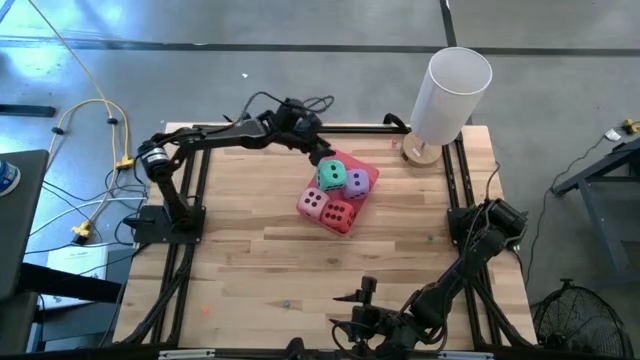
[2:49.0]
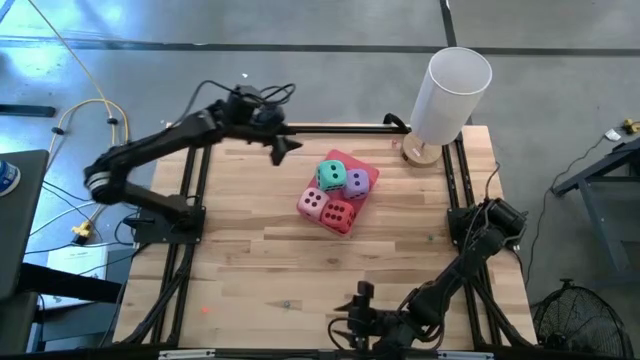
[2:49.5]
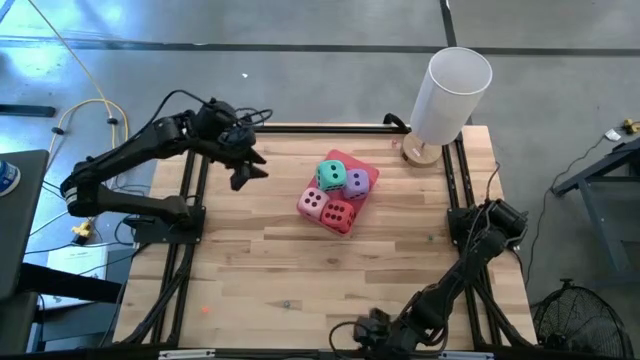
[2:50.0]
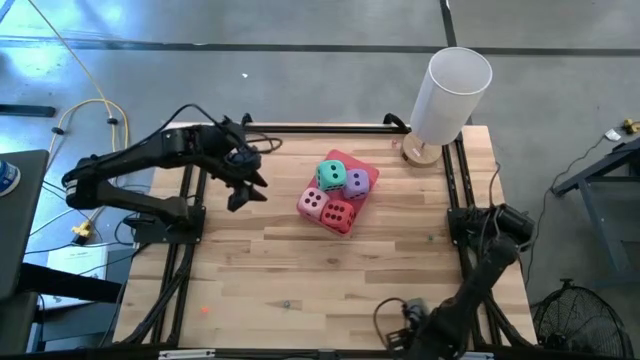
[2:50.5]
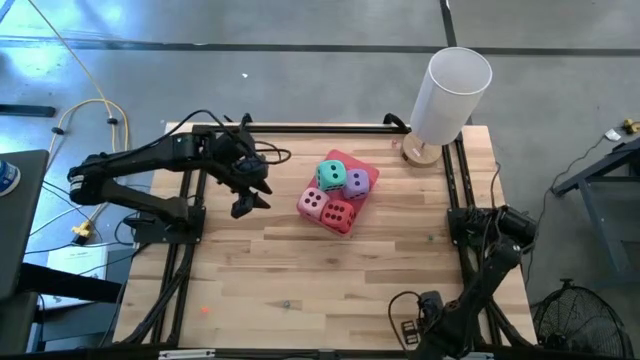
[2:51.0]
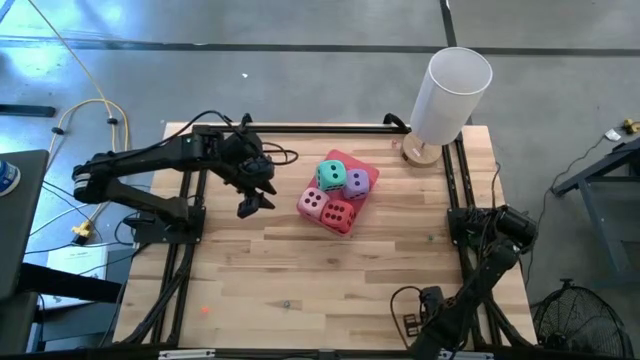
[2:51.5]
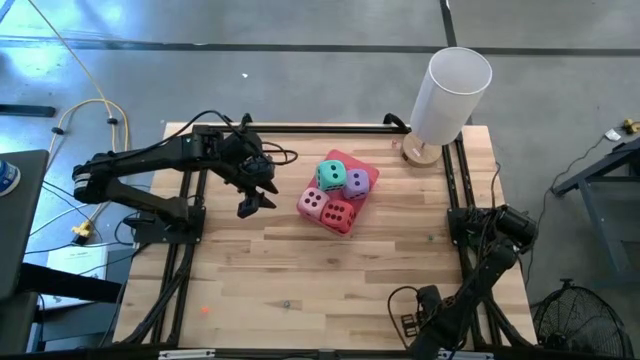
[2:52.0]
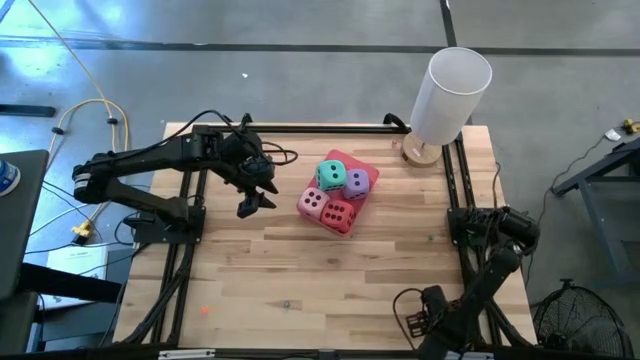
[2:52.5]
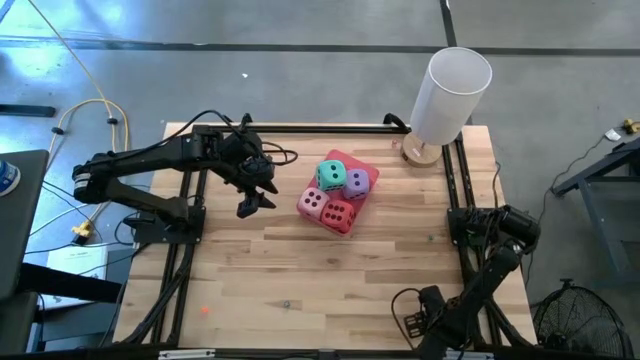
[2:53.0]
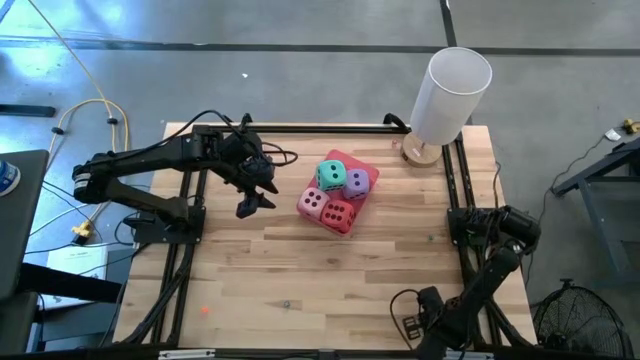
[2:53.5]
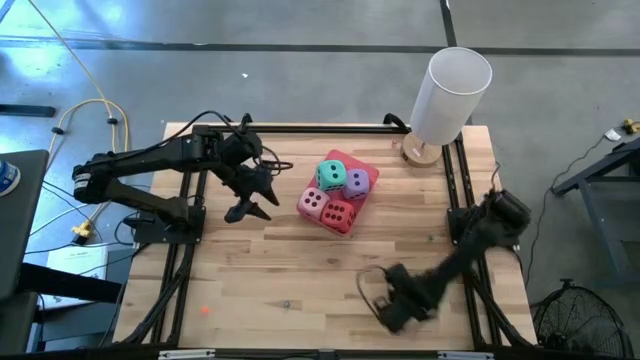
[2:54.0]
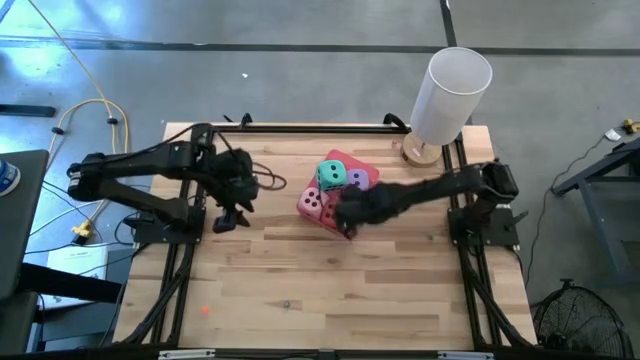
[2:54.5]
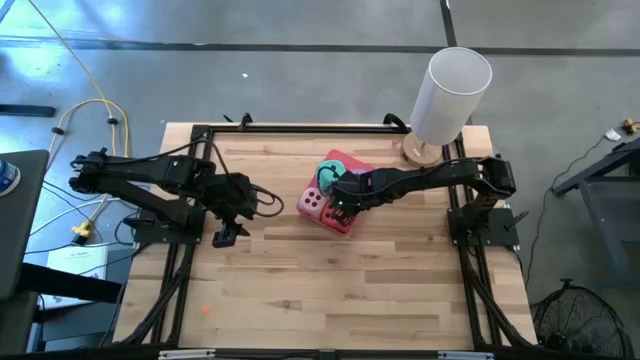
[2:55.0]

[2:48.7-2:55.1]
Task: Pick & Place Dice
Put the small red die into the red bin

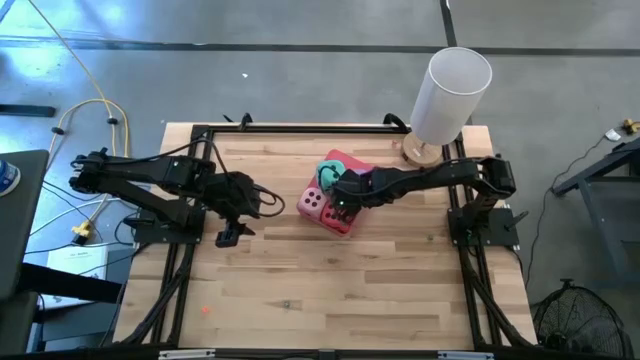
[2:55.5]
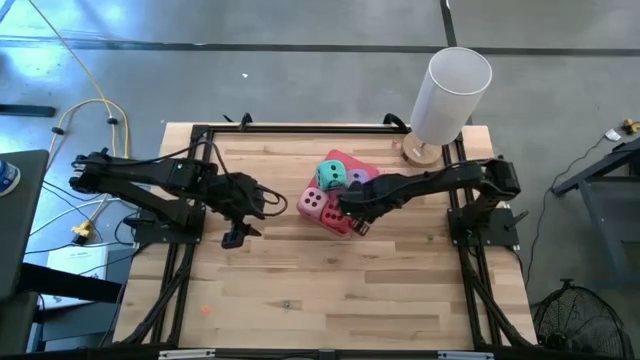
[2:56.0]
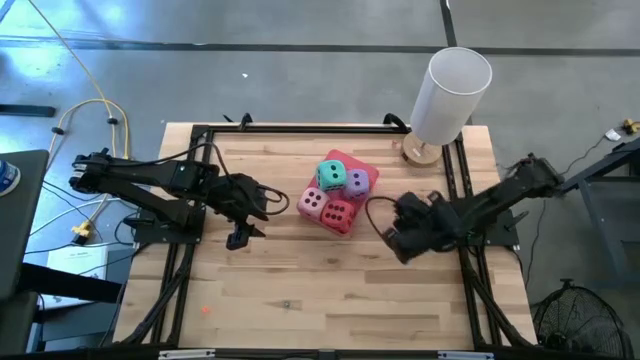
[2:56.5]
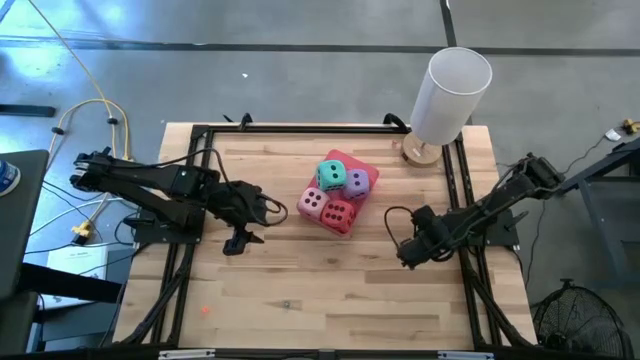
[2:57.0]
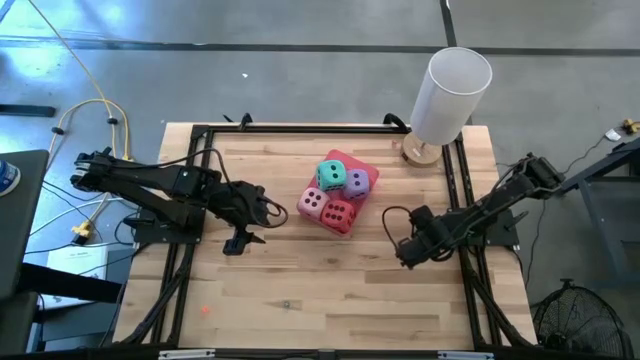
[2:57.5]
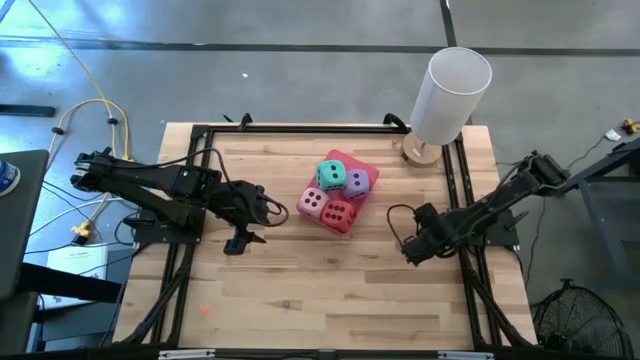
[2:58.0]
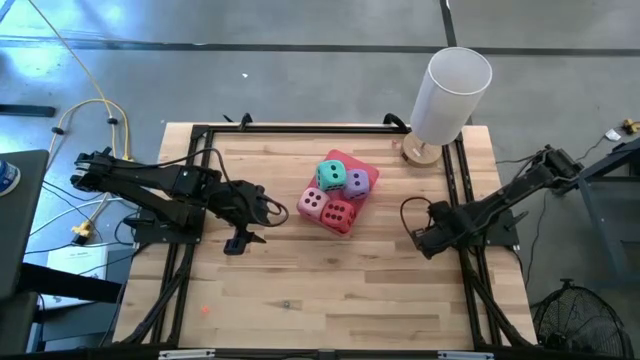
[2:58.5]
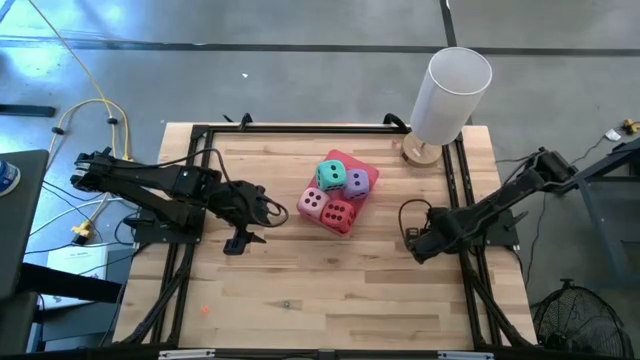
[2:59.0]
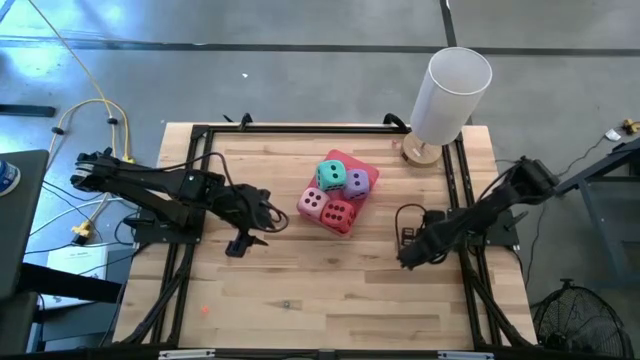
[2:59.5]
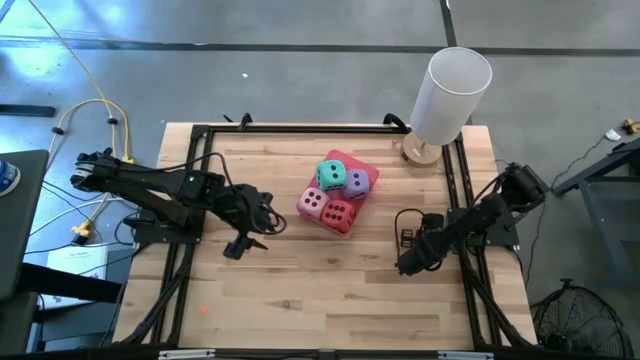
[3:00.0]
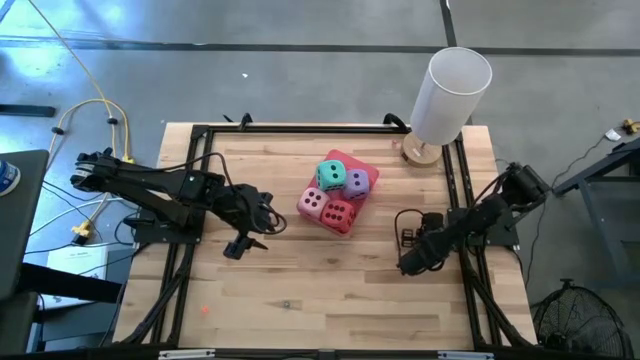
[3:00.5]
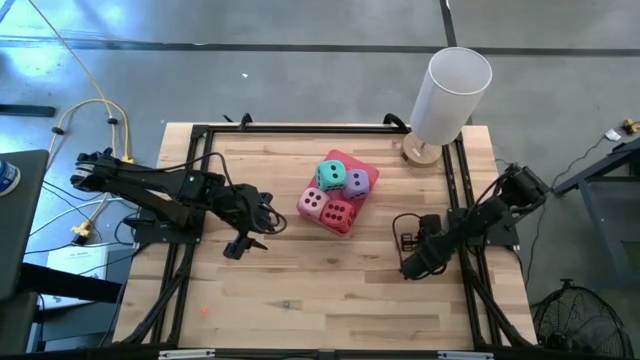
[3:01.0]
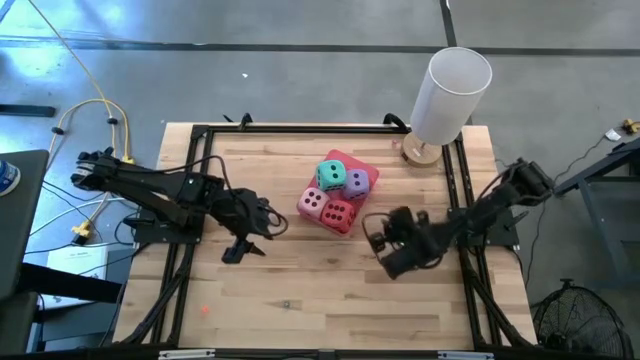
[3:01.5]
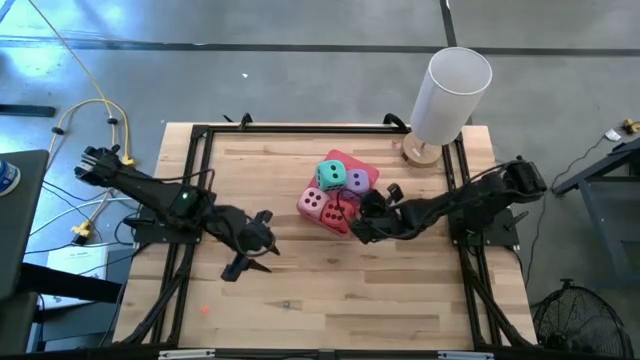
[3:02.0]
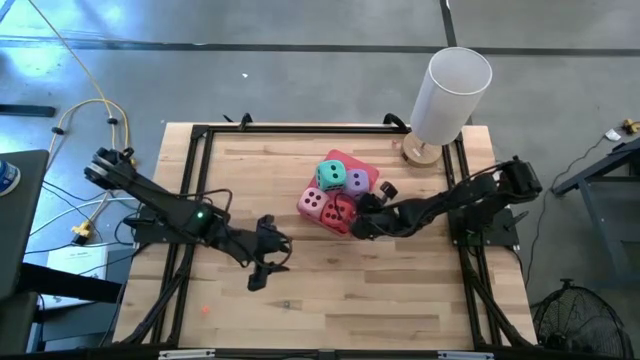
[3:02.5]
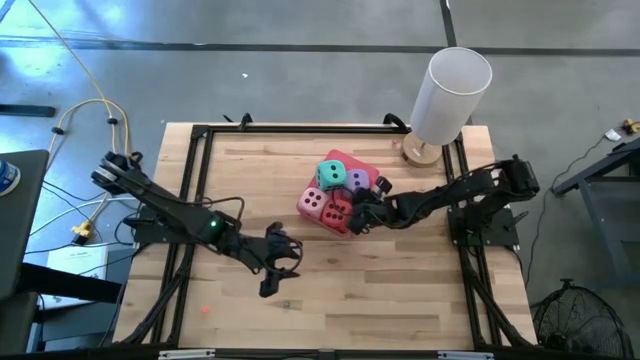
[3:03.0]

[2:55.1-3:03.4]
Put the small green die into the red bin

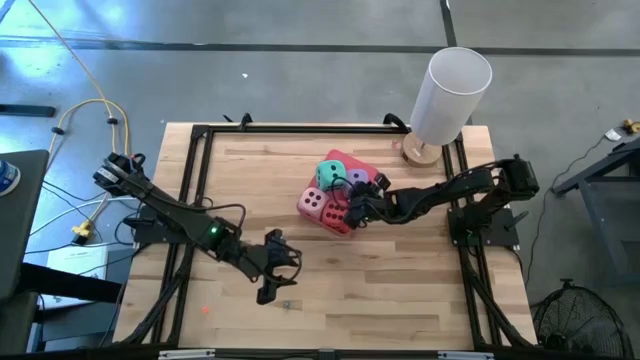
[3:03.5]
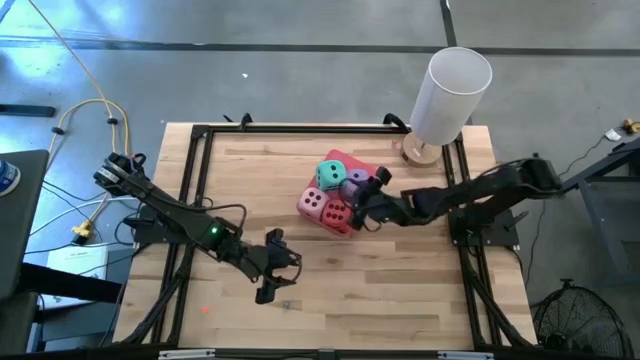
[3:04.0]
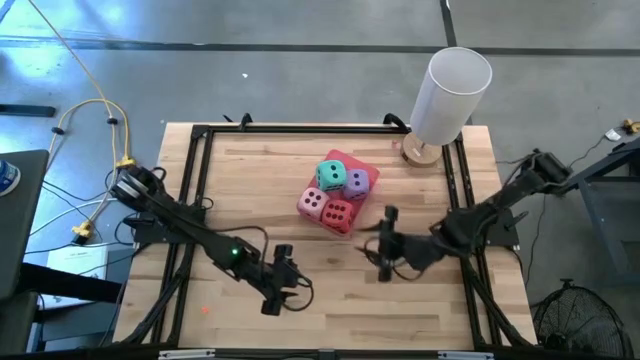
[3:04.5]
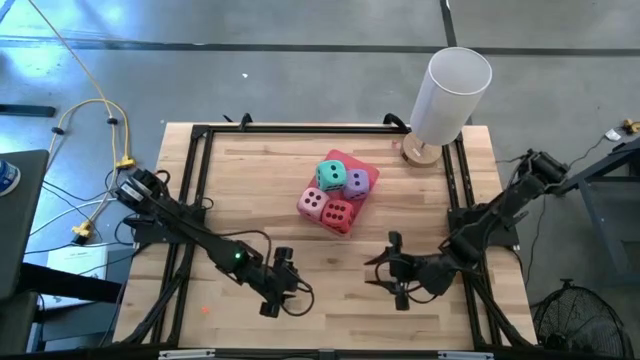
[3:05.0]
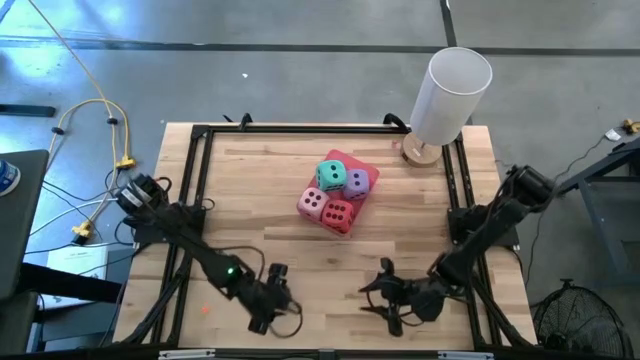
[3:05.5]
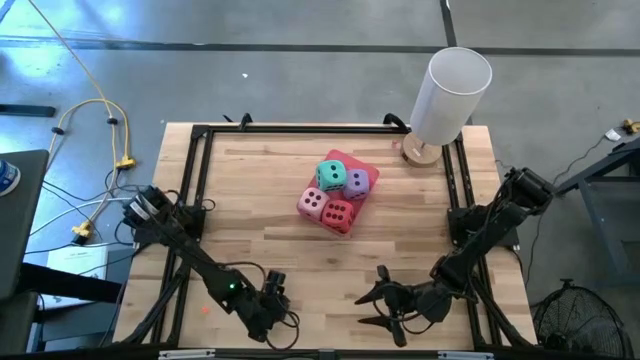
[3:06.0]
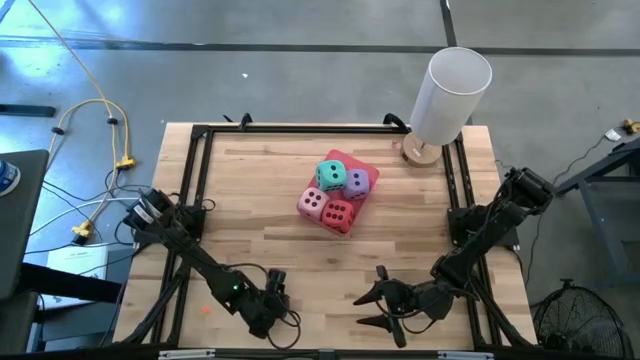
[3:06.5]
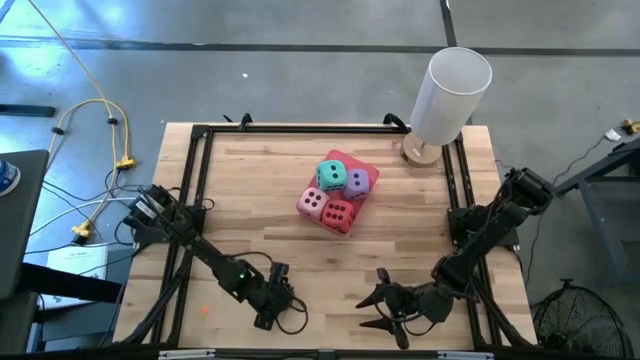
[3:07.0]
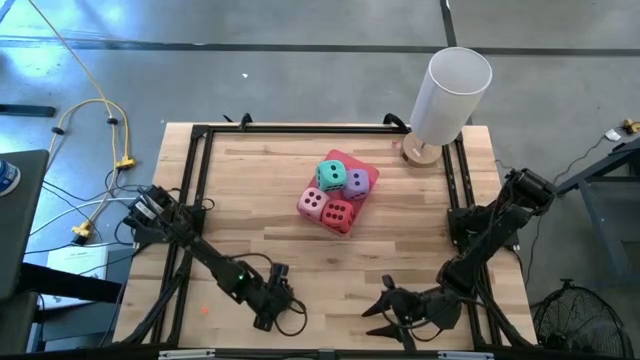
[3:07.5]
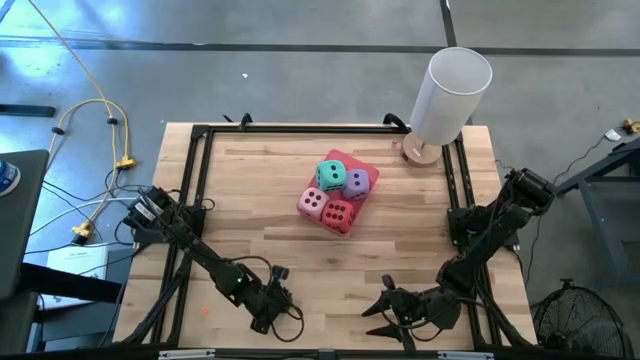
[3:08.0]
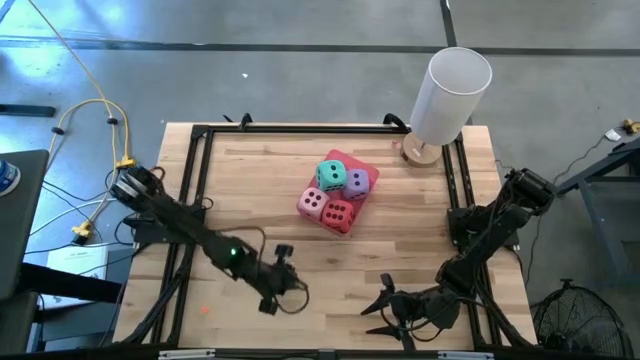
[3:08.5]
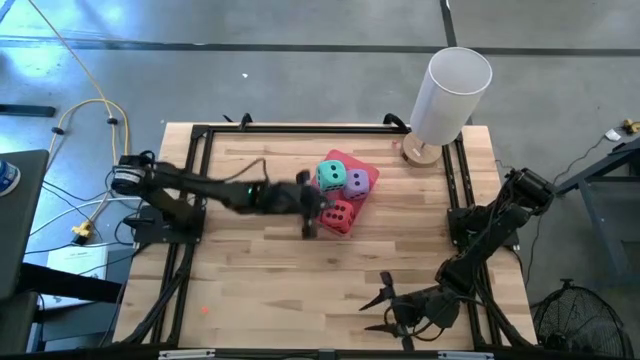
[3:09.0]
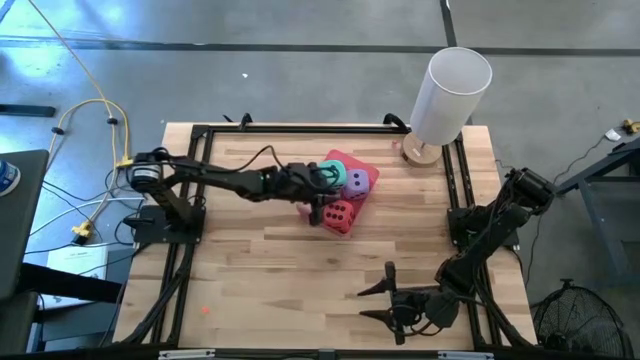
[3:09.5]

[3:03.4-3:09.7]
Put the small light blue die into the red bin
